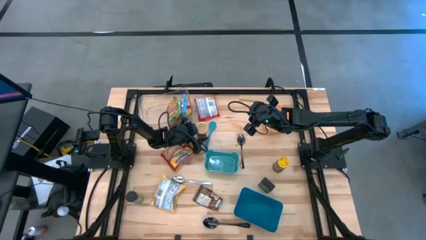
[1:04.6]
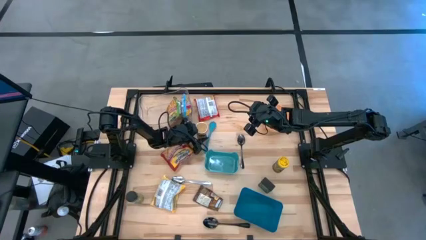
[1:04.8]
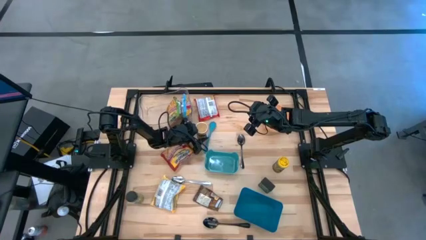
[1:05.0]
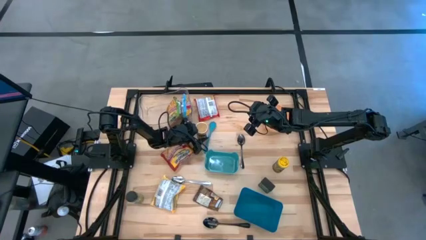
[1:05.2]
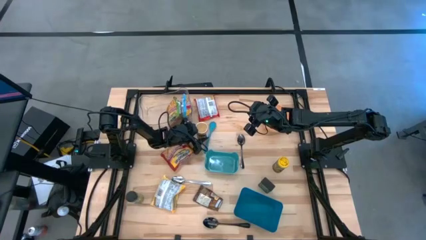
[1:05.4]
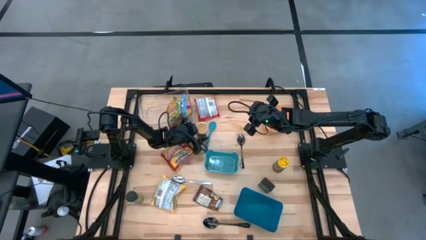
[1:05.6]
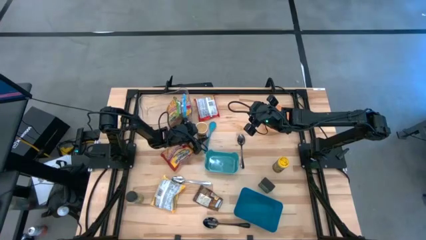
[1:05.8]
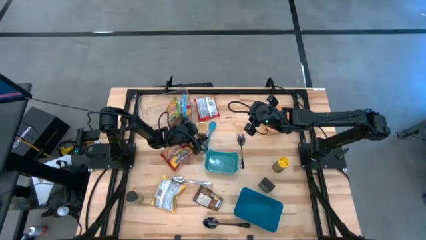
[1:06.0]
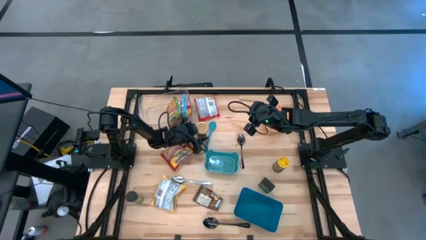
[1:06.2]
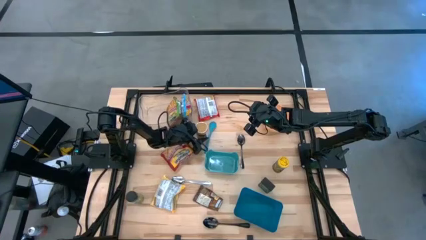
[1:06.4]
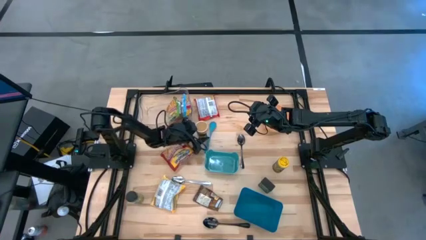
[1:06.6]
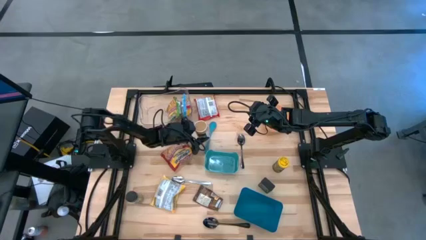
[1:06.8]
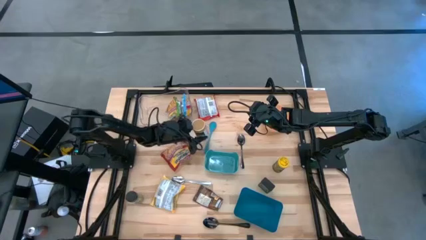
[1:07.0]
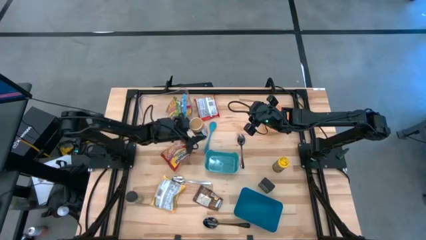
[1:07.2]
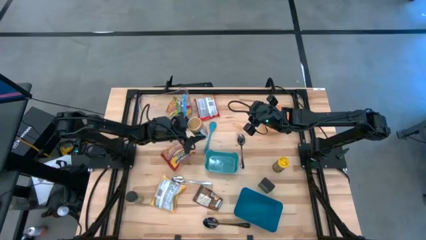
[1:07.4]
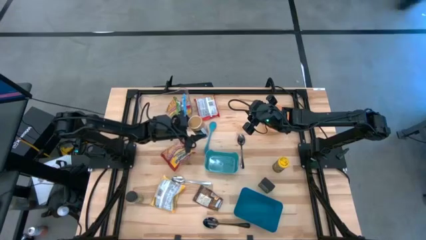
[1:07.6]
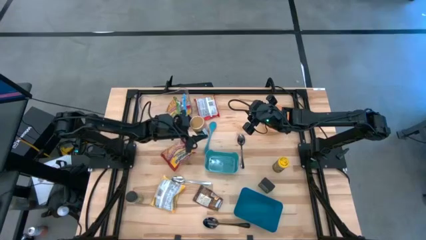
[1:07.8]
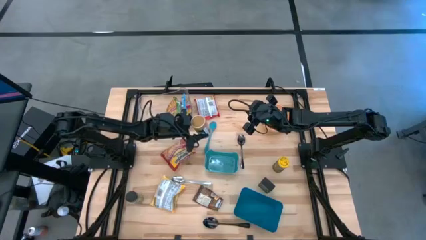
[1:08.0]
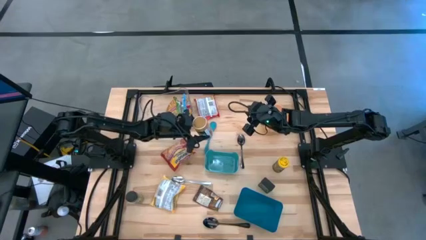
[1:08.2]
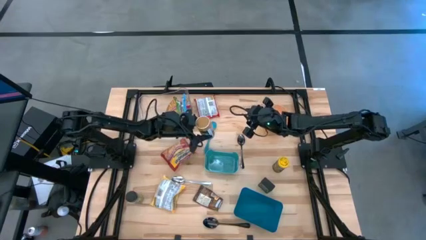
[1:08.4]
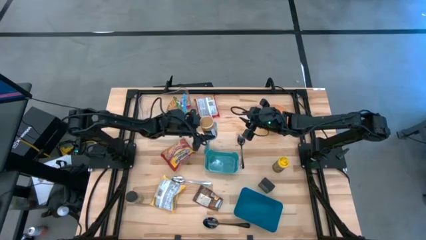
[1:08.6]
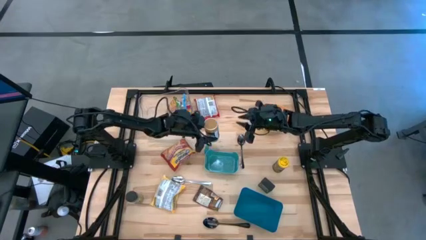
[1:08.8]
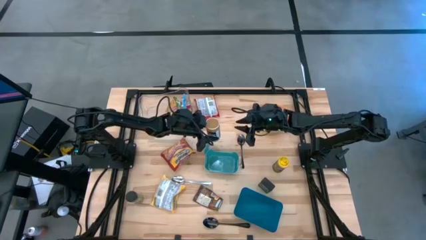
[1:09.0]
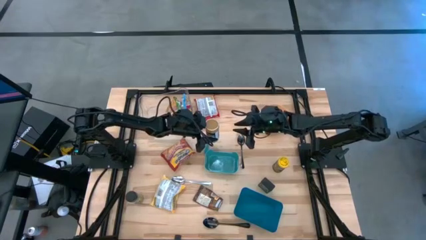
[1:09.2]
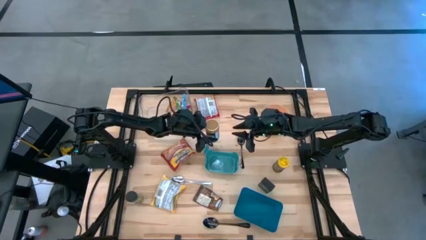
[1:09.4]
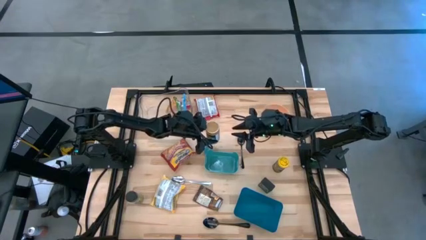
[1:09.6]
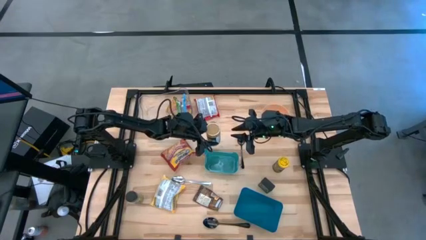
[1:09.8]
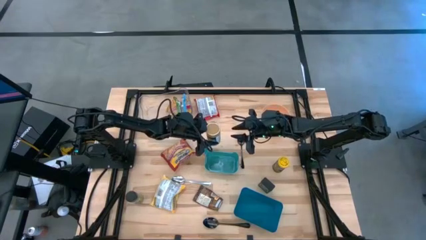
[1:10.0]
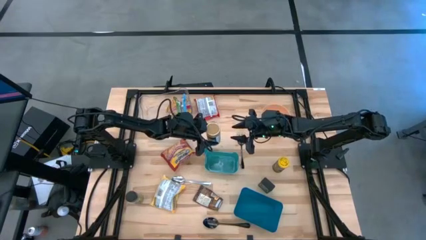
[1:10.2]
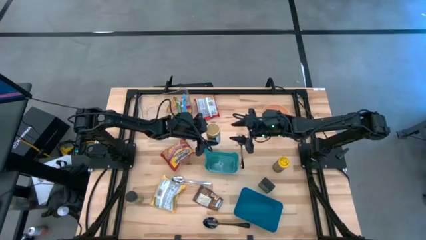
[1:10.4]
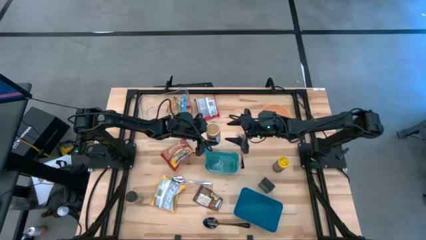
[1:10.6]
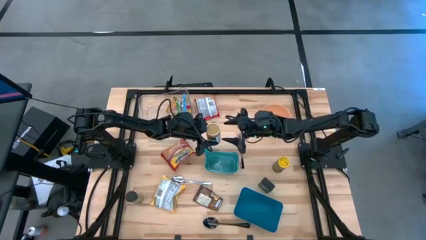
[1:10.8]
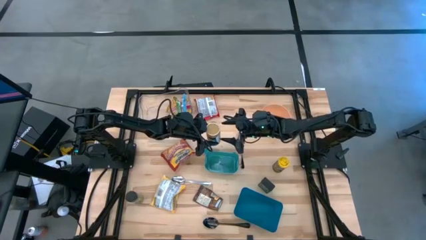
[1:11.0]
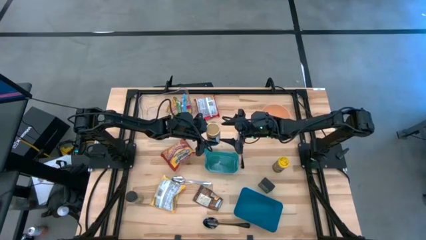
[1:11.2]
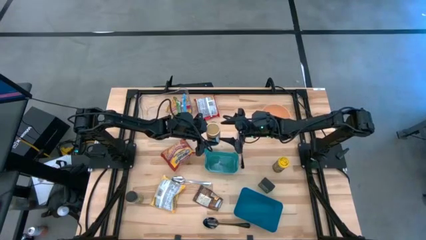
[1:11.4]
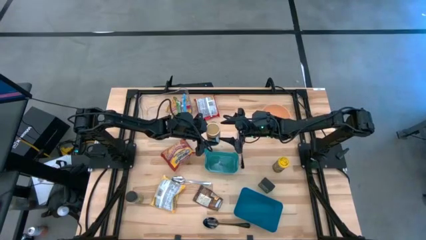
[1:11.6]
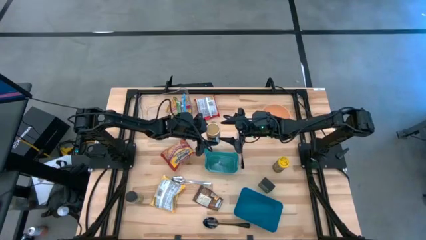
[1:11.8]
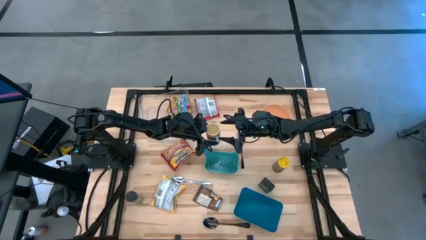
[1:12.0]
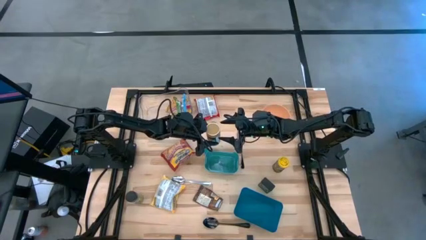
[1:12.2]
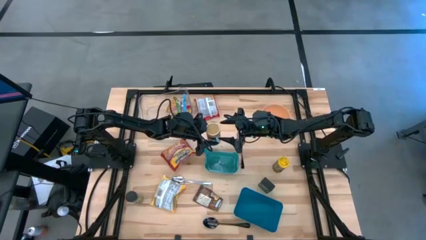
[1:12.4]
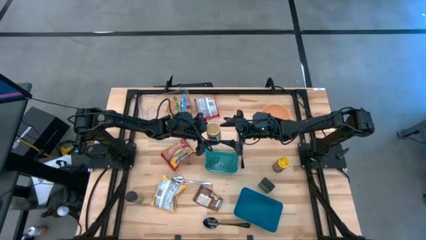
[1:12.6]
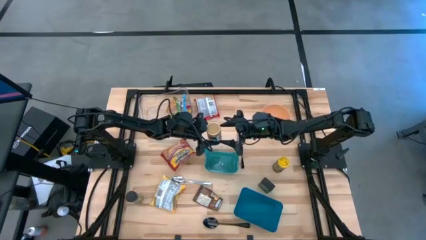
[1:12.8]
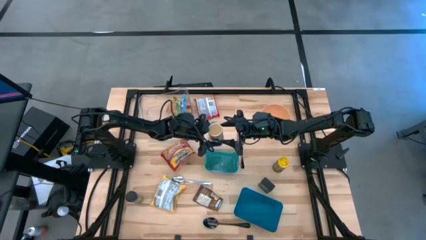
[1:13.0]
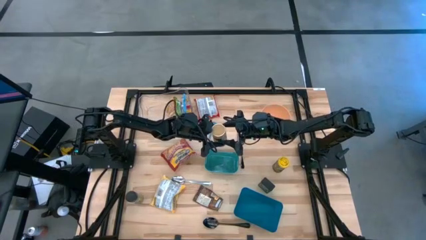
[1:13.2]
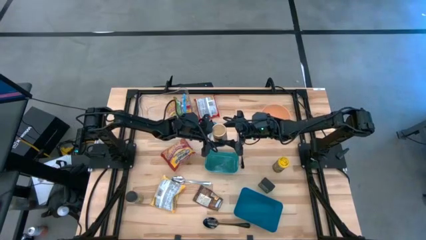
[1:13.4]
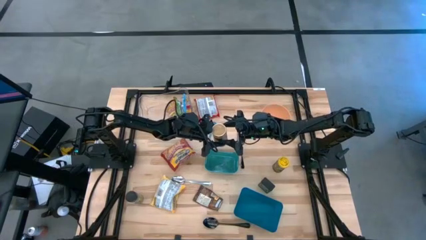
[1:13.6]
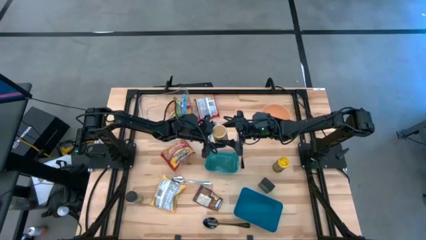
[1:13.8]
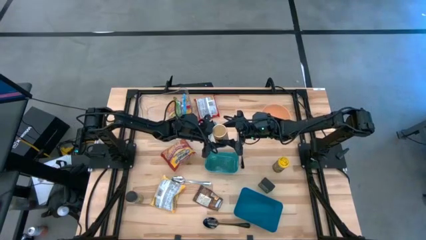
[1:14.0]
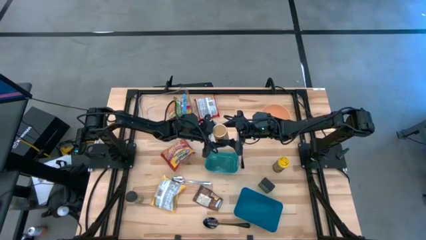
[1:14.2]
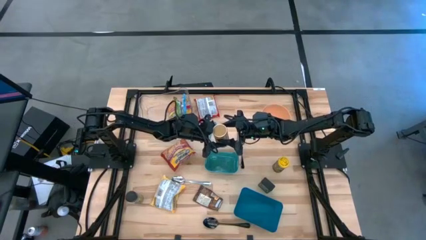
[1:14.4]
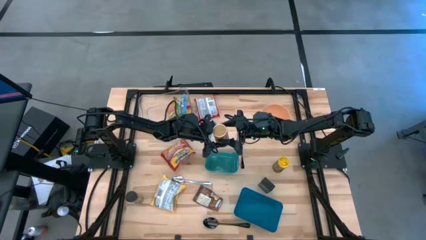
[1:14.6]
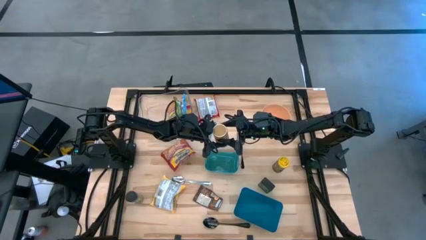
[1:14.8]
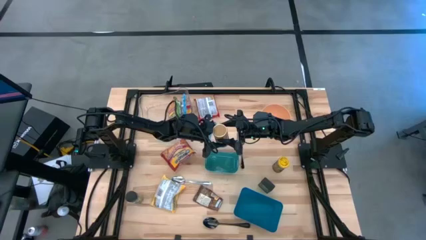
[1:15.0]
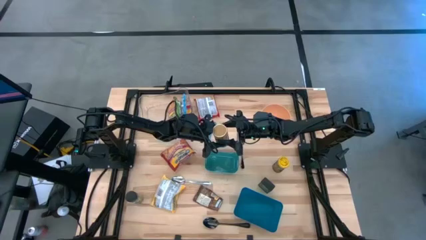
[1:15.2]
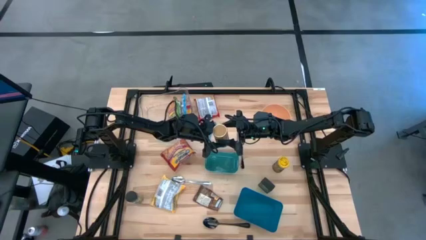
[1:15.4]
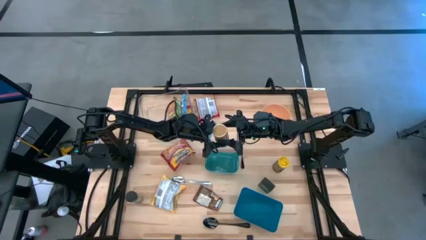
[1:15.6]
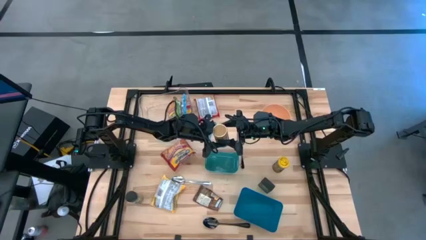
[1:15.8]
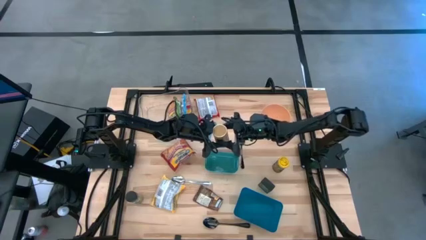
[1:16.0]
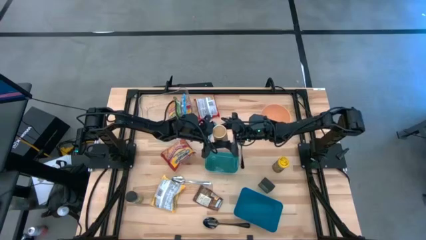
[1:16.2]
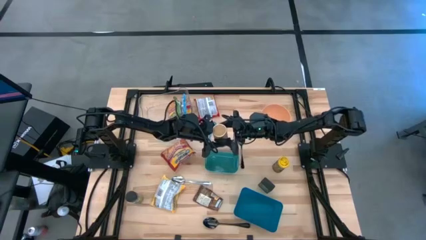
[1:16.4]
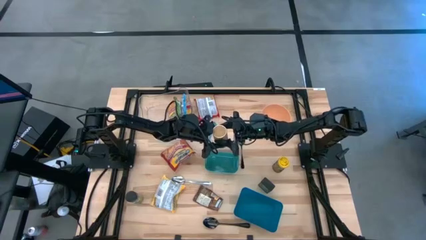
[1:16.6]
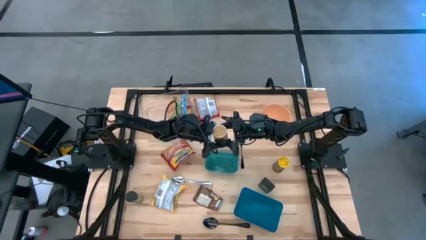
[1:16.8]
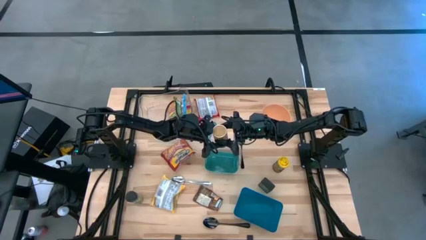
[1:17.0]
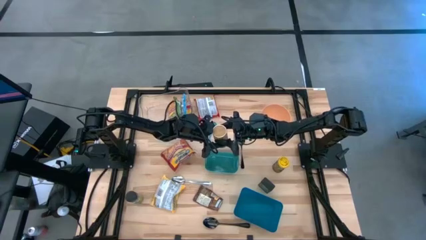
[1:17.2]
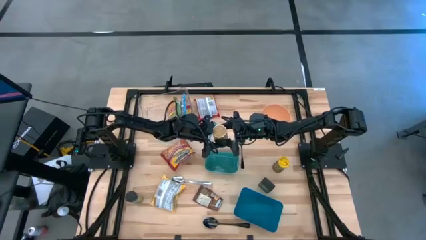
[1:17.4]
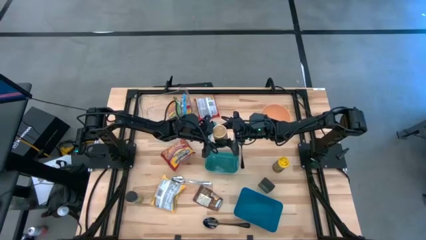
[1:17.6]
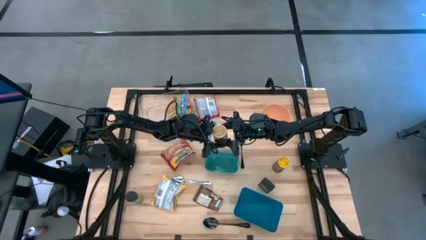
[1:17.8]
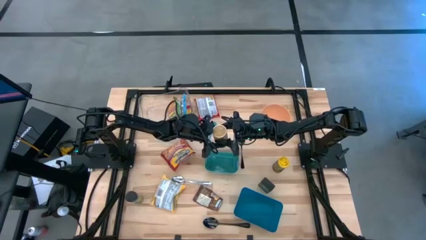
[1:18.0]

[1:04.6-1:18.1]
Task: Pick & Place Food Item
Put the gold seasoning bottle into the blue bin
